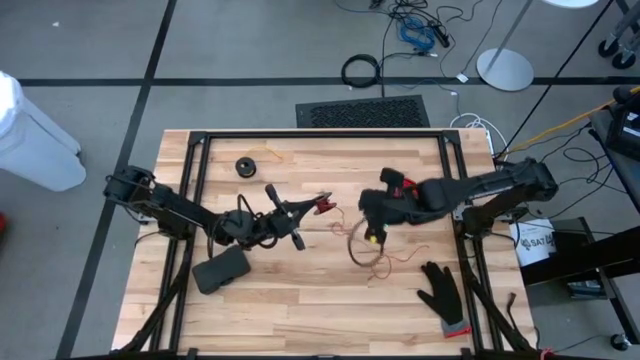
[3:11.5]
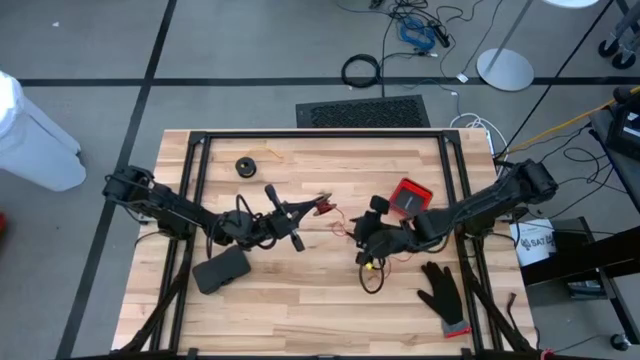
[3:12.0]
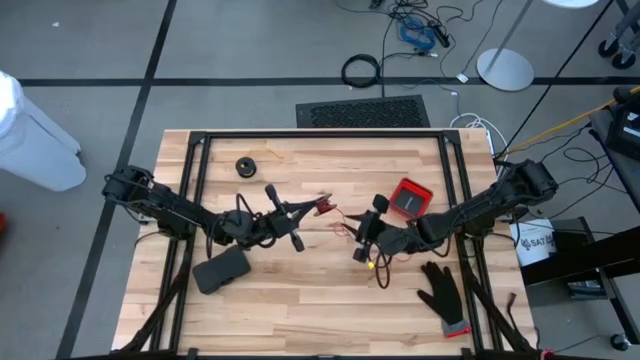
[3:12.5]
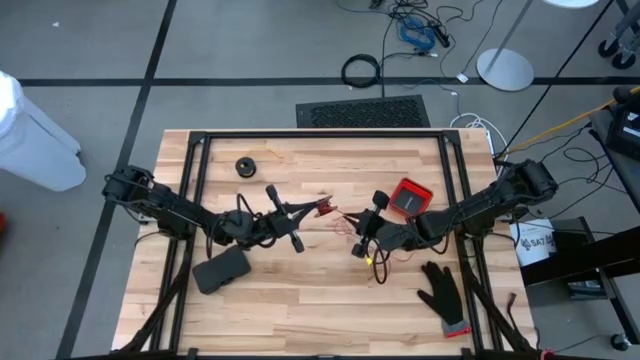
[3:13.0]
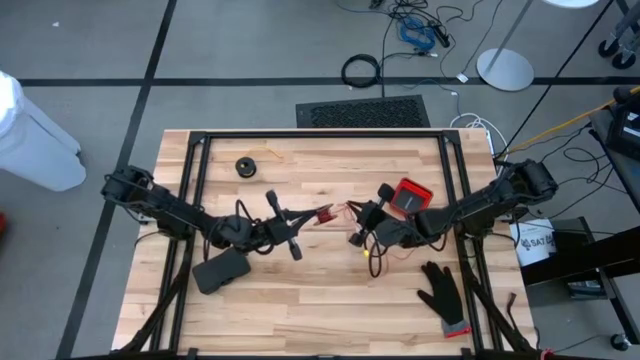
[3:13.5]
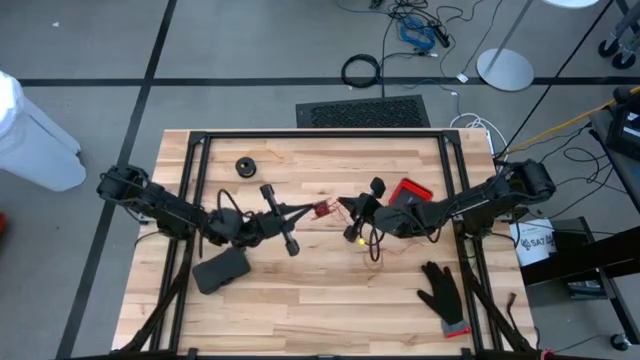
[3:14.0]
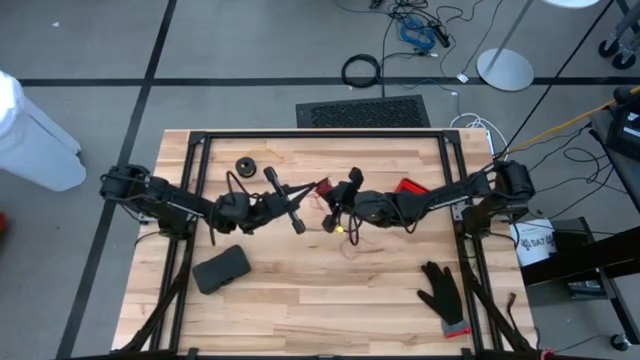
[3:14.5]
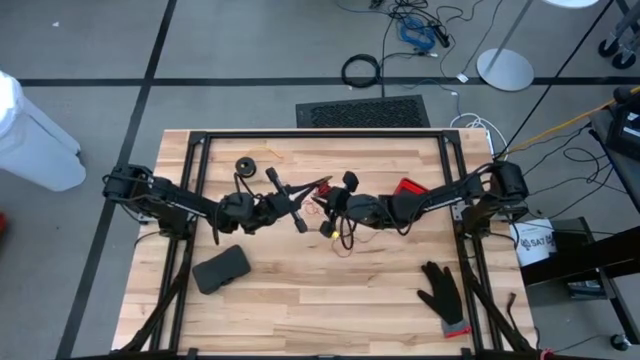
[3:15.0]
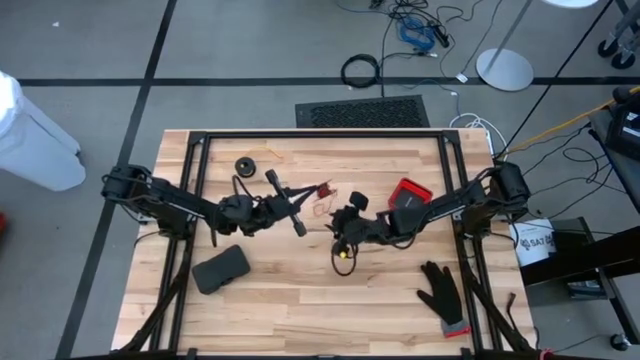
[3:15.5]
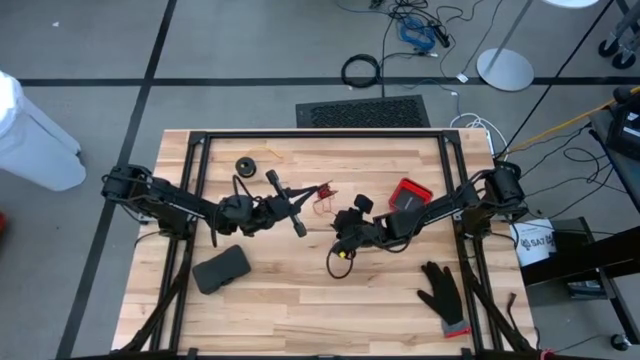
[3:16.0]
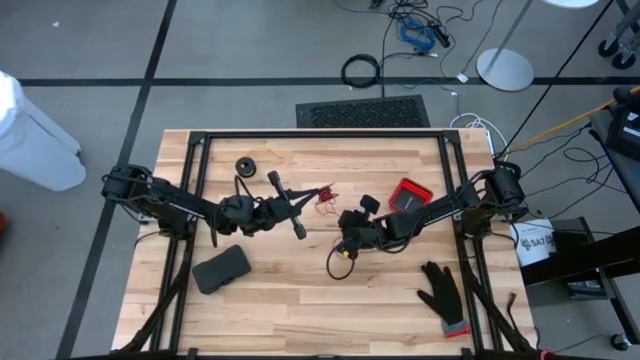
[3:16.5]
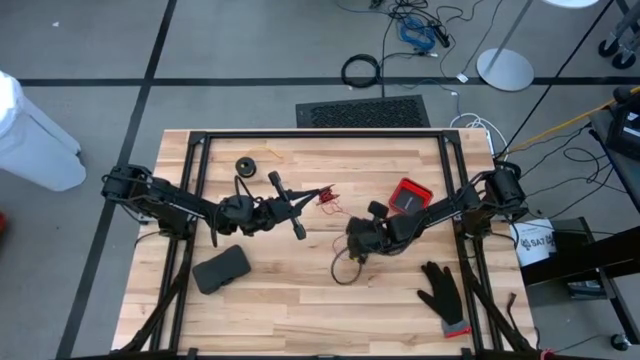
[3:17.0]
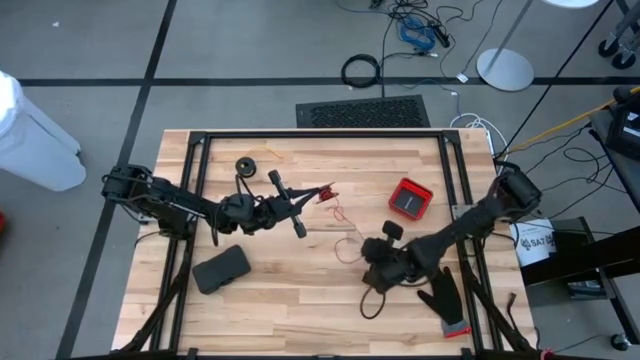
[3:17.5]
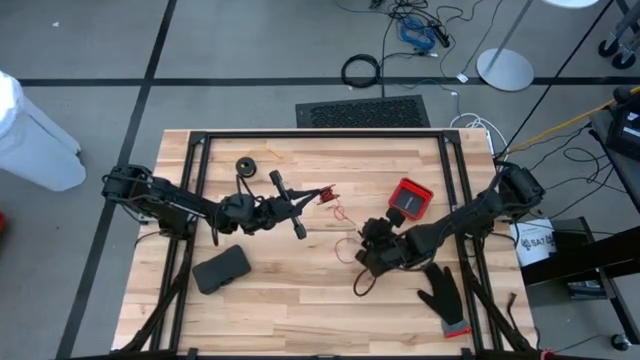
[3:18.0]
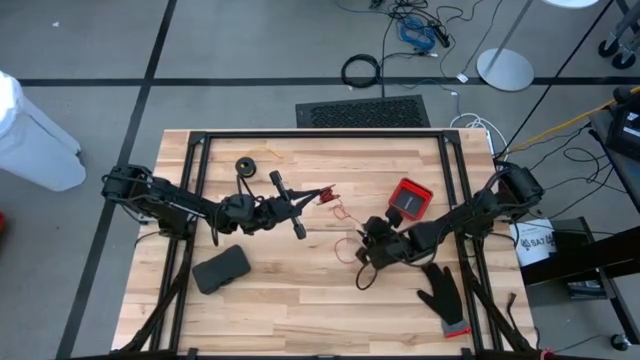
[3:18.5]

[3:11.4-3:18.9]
Task: Coil cords
Coil the red wire onto the black spool

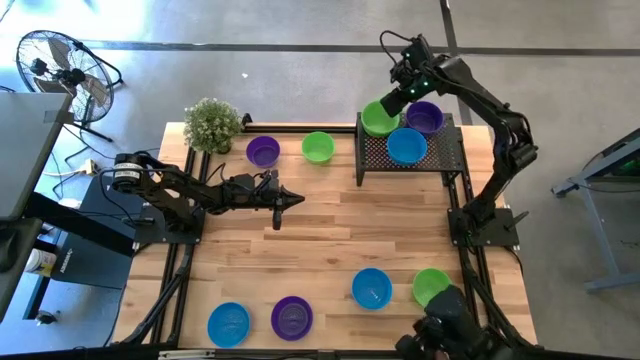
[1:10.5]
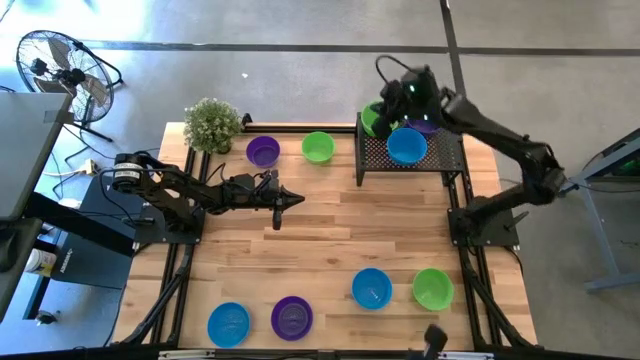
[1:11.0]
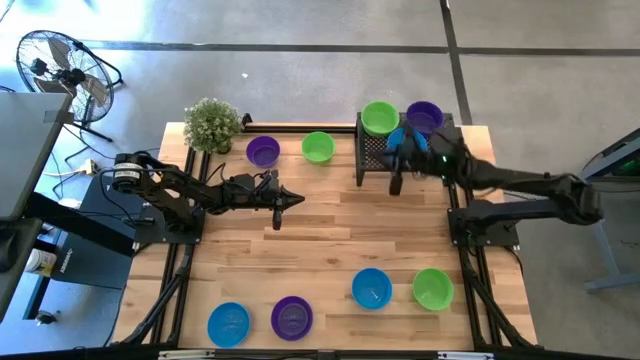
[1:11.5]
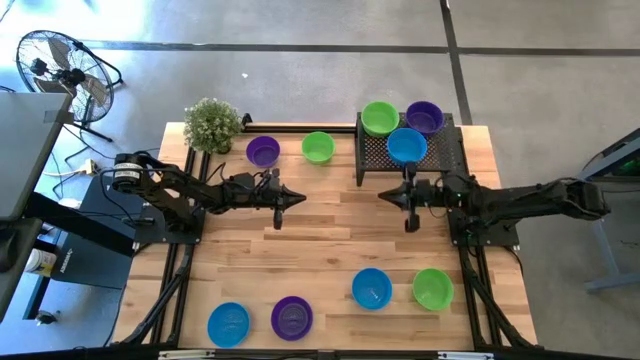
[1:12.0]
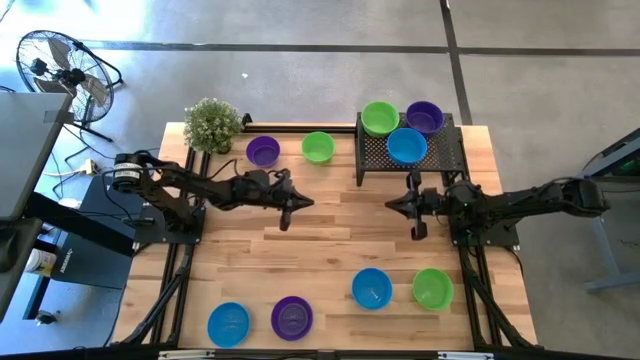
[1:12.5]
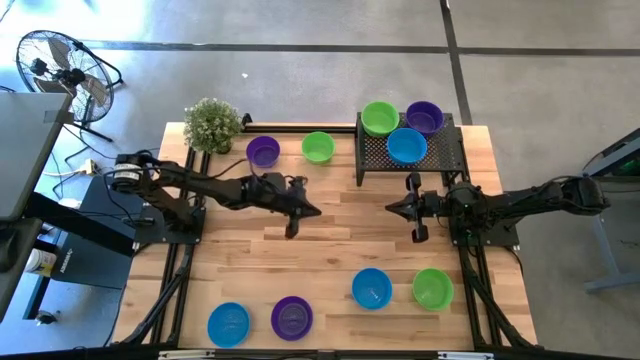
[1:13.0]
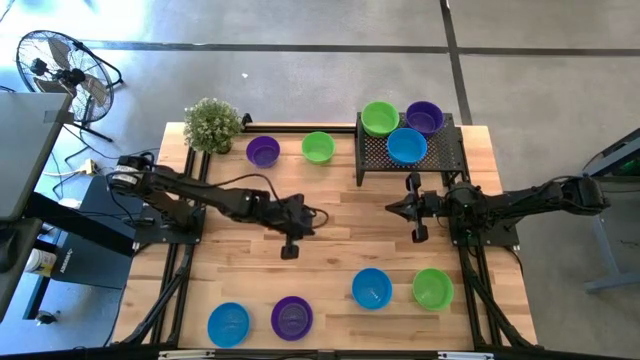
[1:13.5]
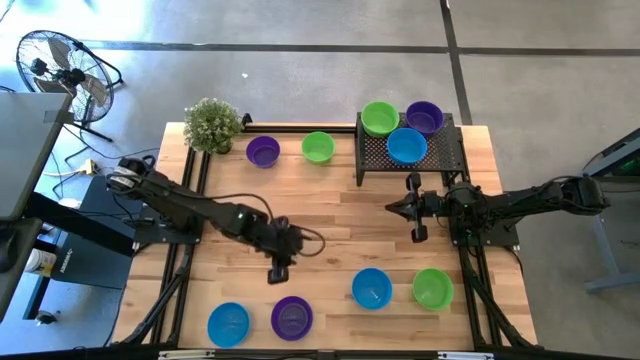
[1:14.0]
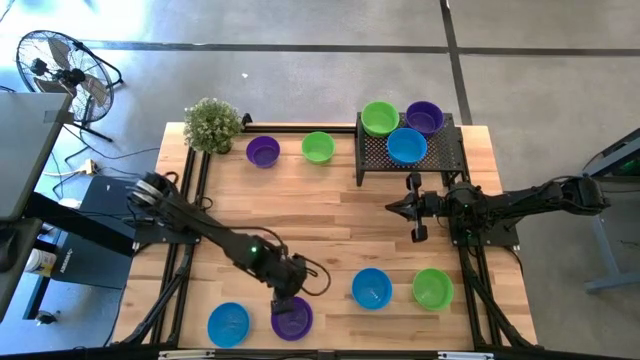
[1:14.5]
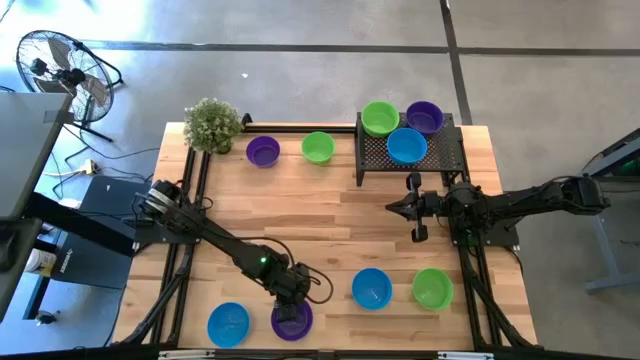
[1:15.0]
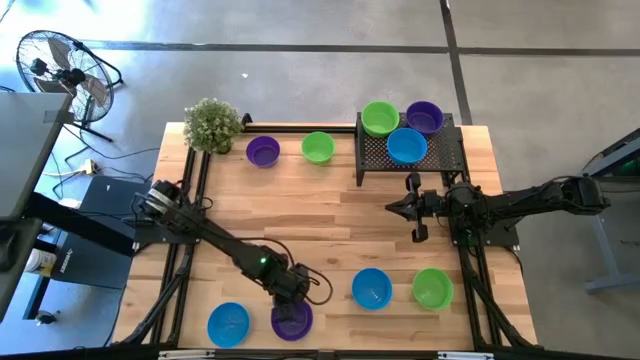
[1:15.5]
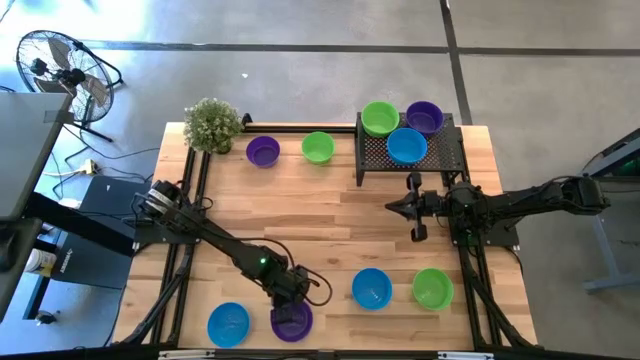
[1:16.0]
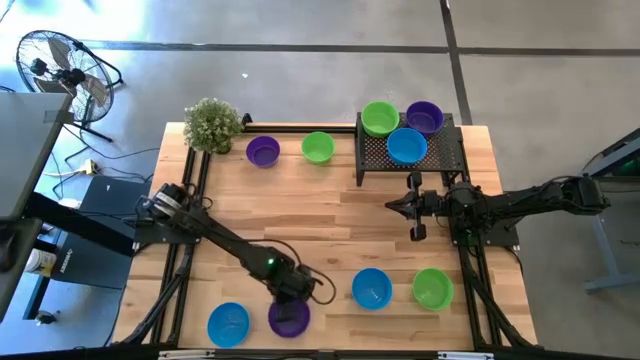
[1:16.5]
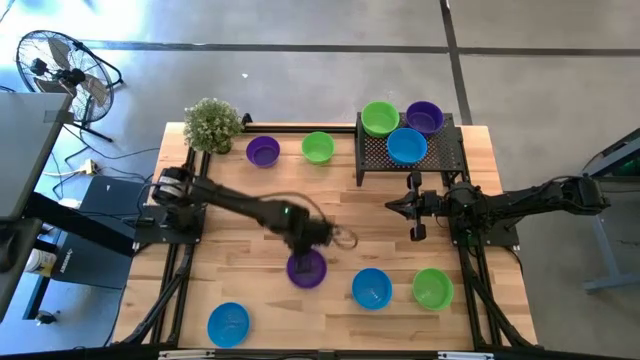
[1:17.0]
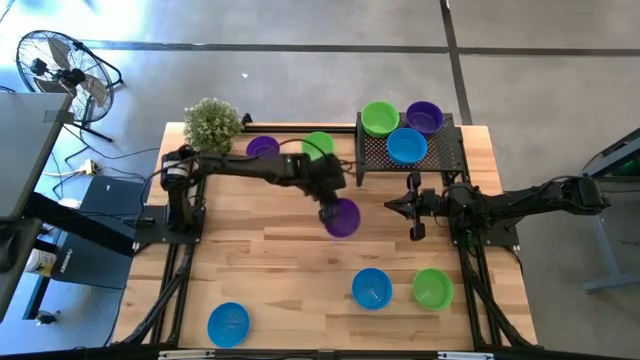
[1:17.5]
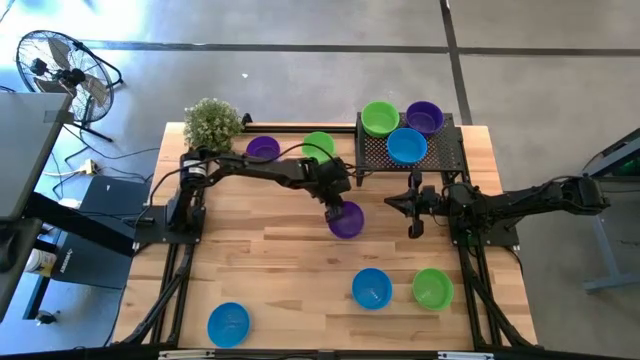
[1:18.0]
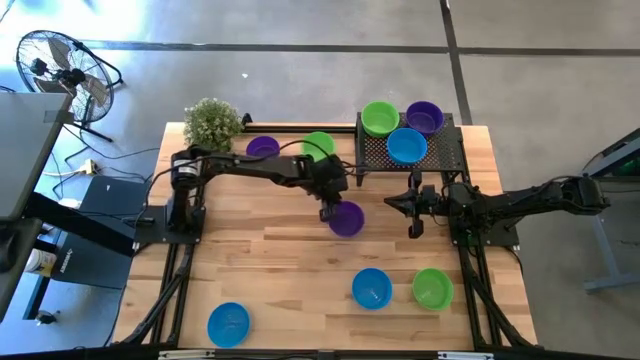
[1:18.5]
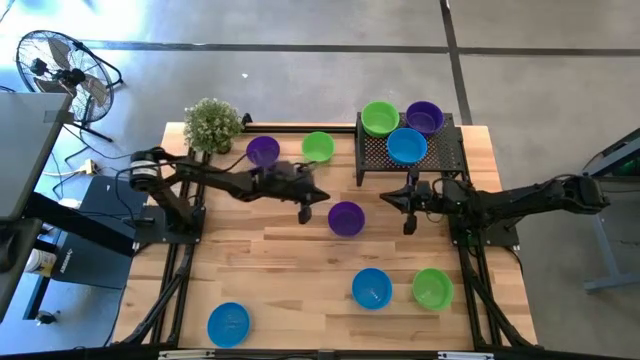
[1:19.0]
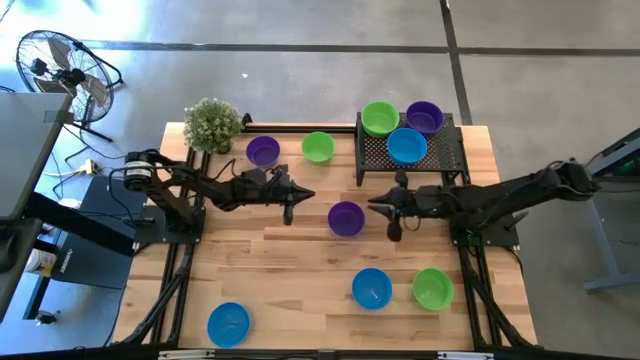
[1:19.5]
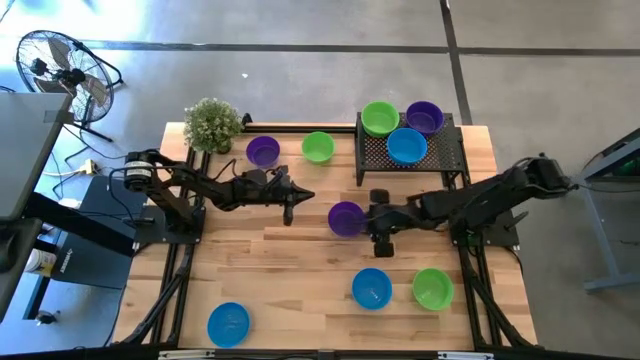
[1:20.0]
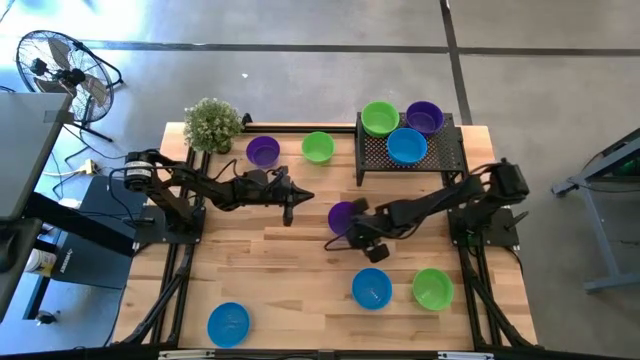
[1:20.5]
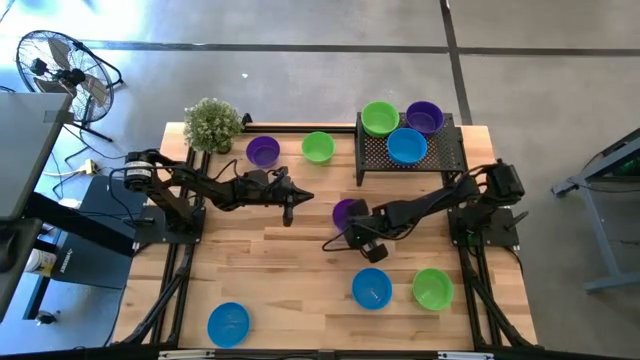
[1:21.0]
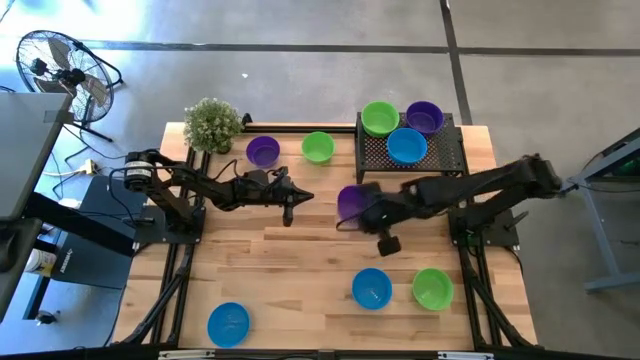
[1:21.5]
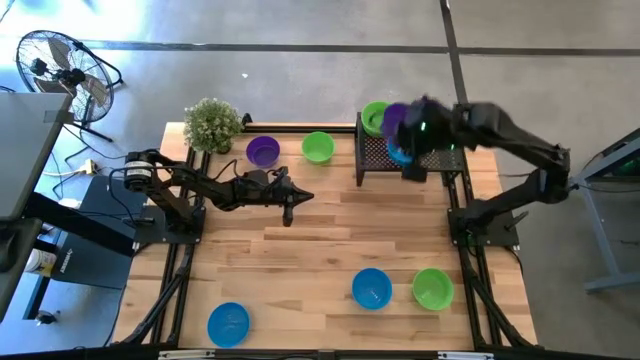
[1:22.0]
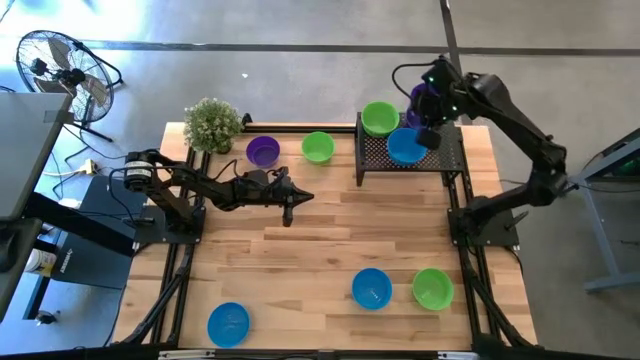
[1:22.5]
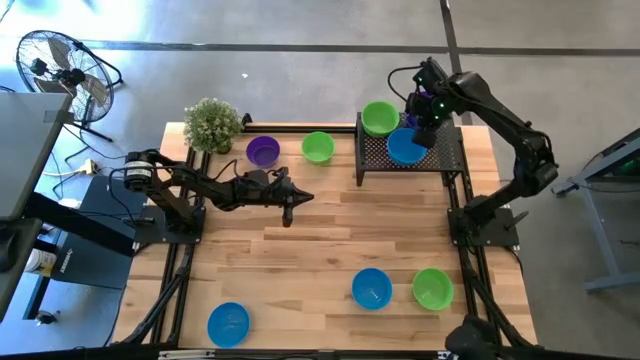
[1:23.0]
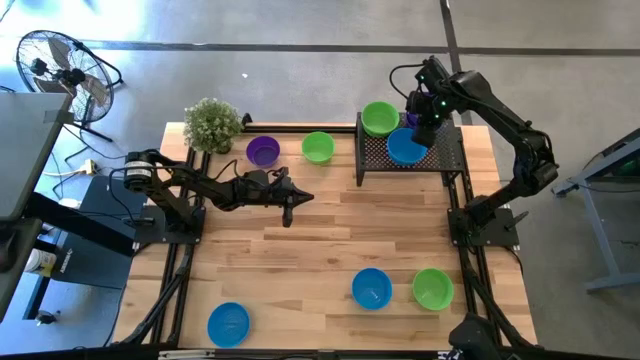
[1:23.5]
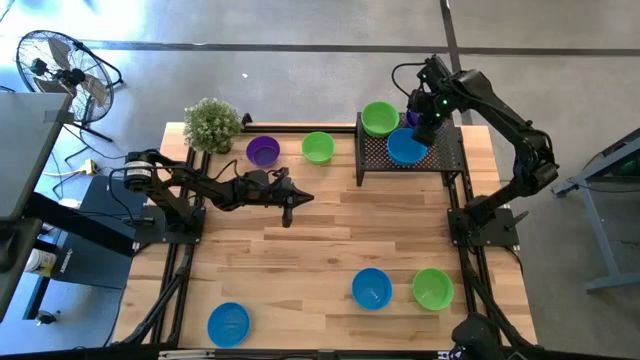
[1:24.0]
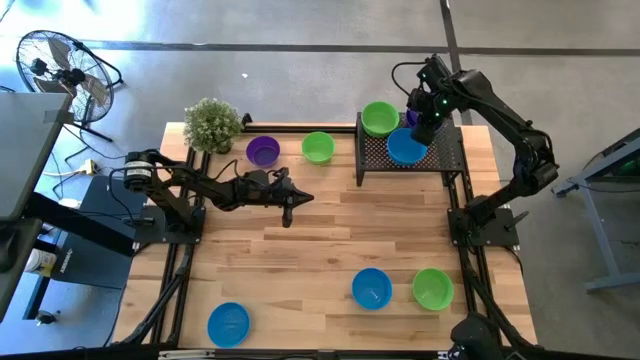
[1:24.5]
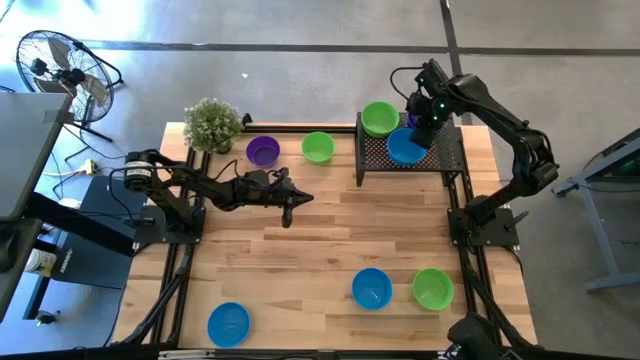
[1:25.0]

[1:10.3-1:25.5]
Task: Pick & Place Mini bowls
Stack the purple bowl on the other purple bowls on the shelf
